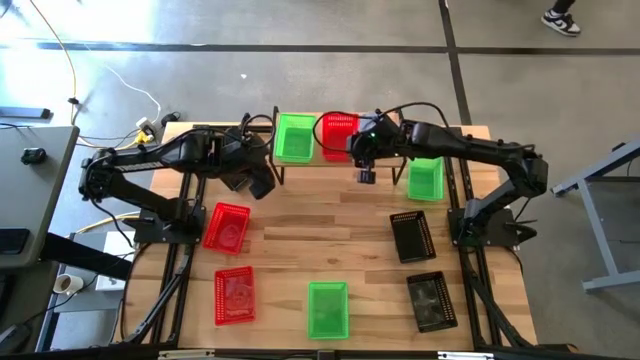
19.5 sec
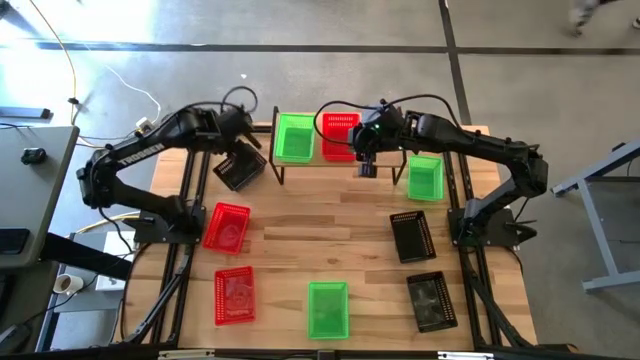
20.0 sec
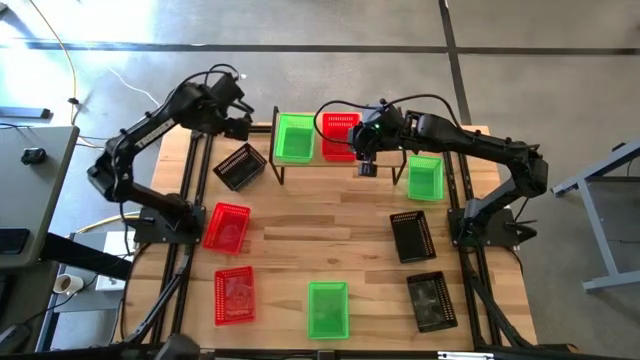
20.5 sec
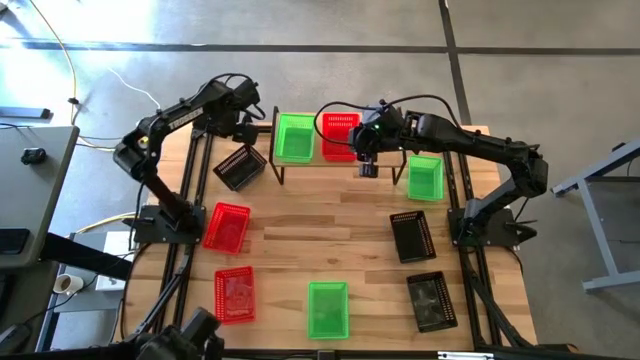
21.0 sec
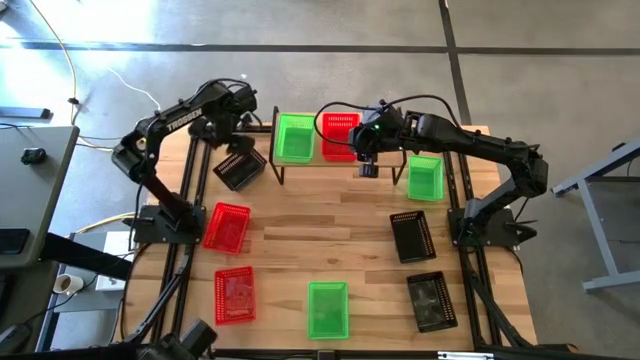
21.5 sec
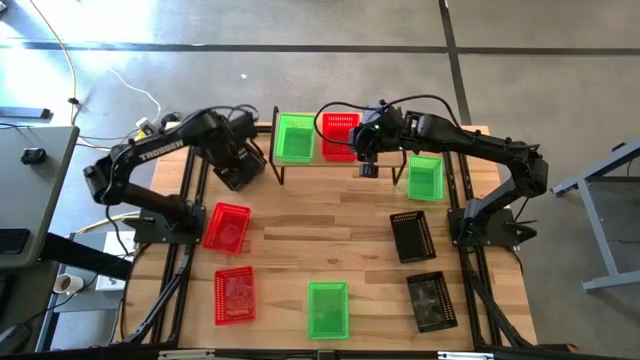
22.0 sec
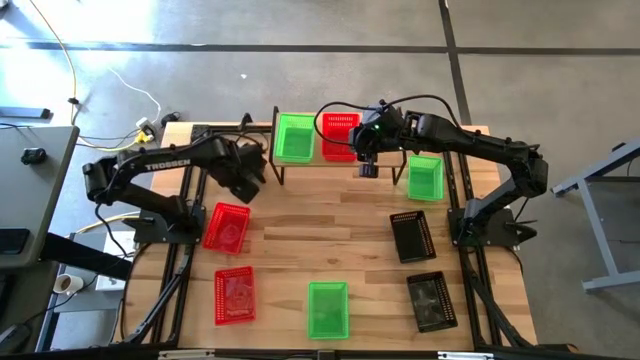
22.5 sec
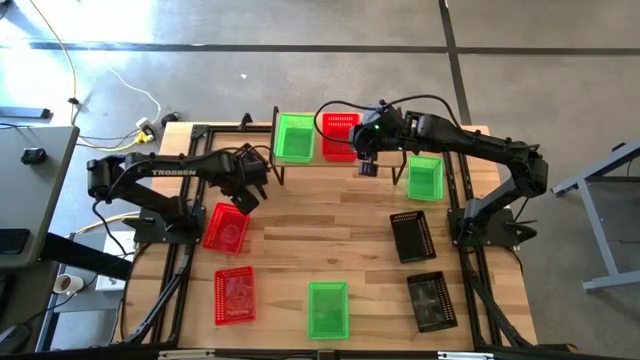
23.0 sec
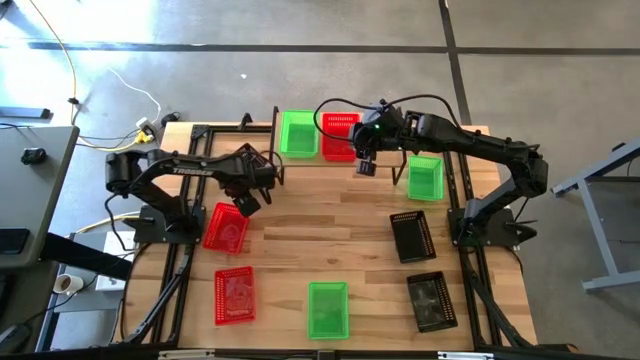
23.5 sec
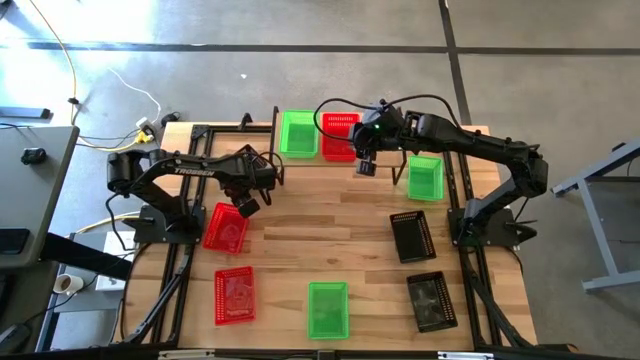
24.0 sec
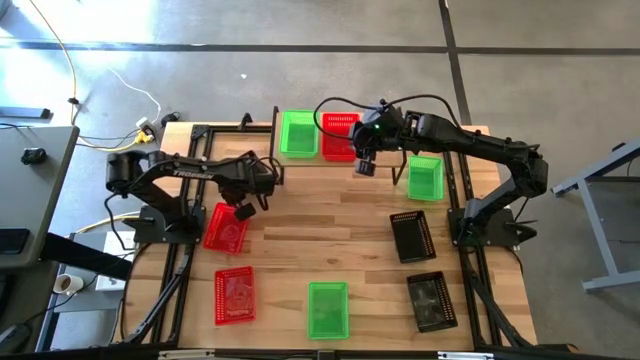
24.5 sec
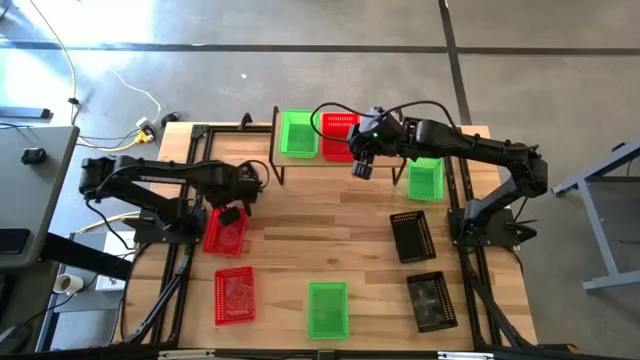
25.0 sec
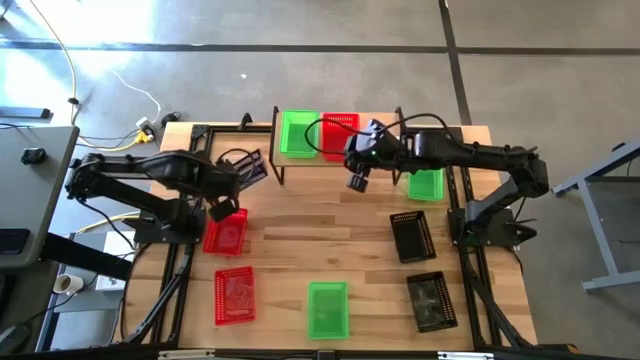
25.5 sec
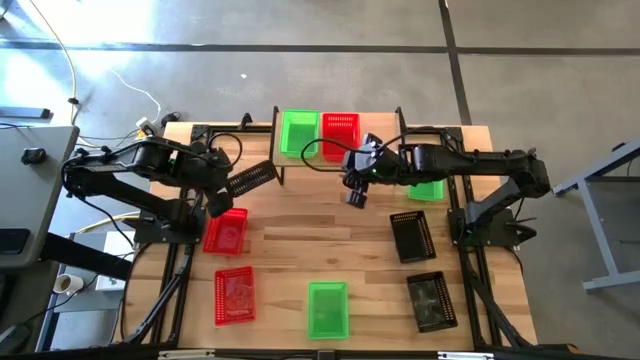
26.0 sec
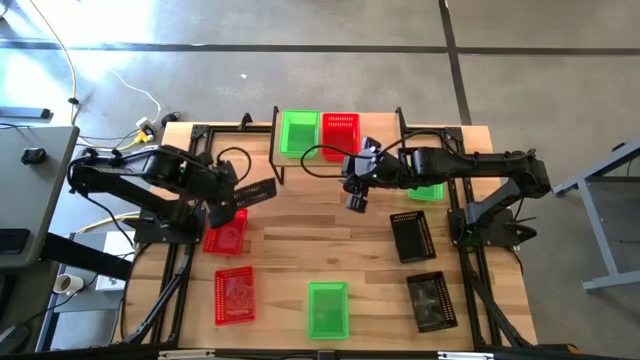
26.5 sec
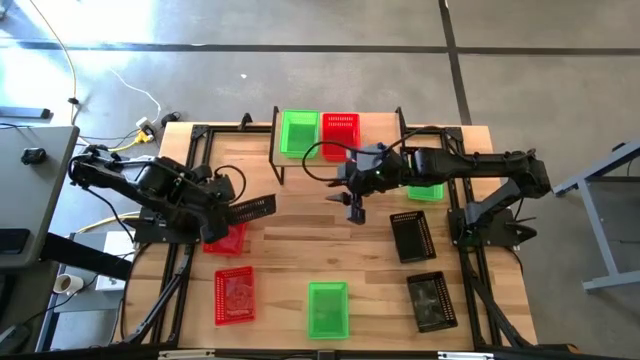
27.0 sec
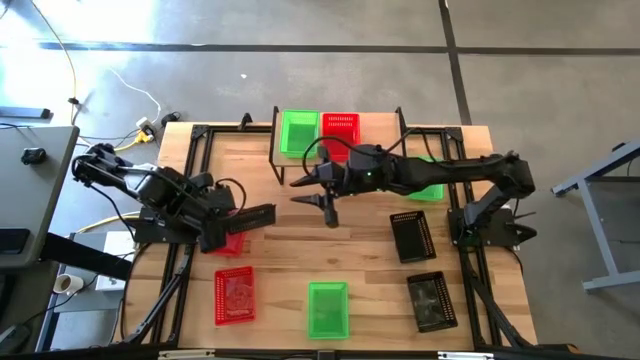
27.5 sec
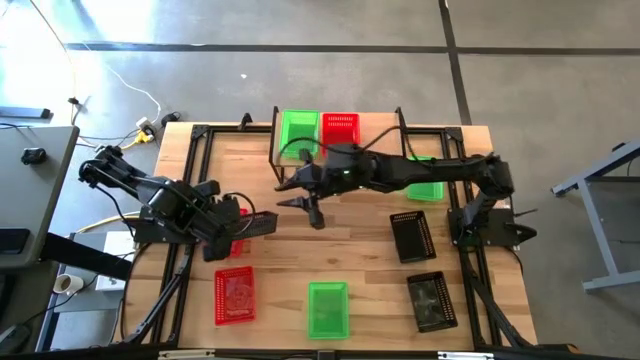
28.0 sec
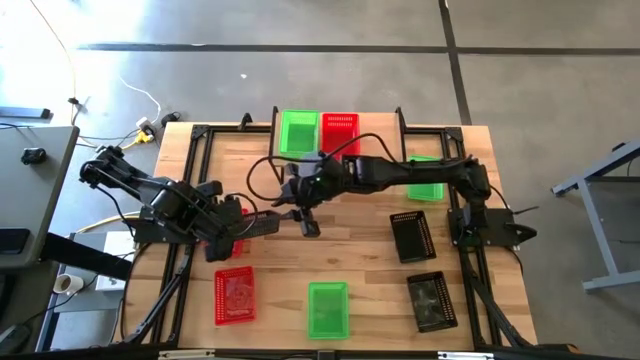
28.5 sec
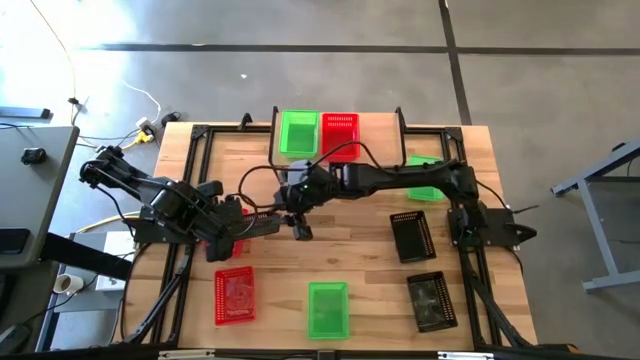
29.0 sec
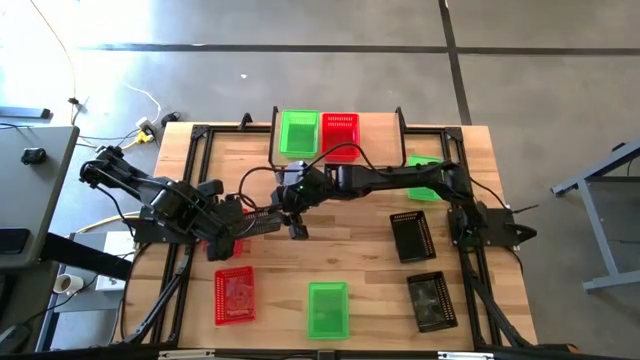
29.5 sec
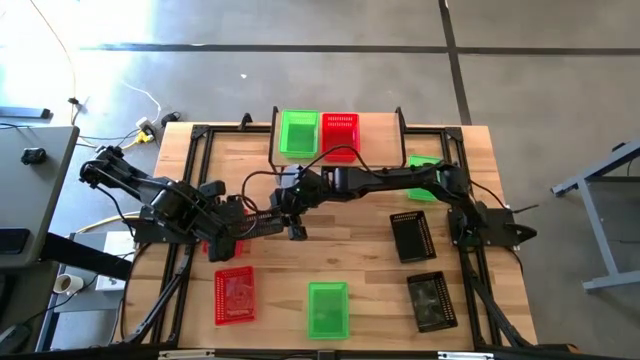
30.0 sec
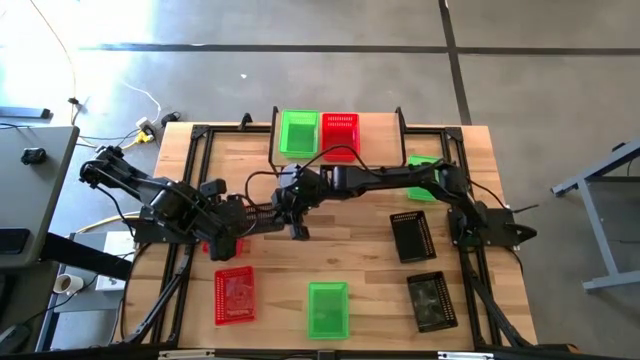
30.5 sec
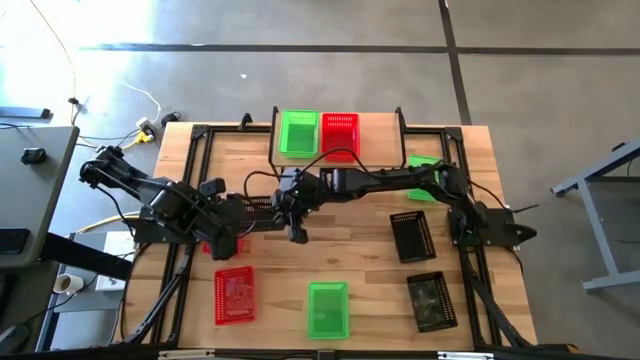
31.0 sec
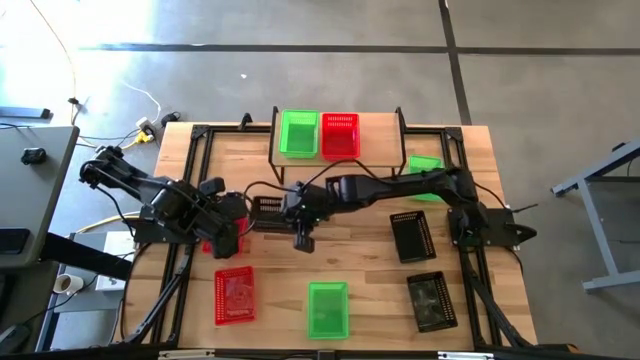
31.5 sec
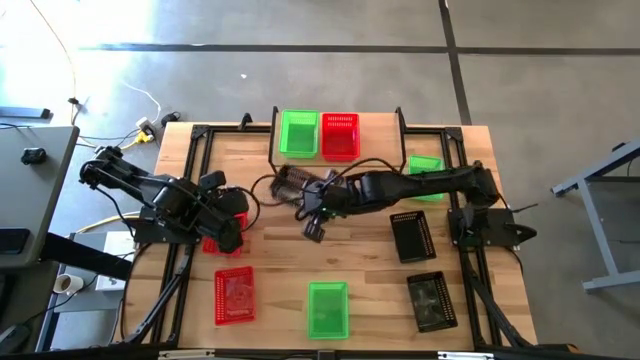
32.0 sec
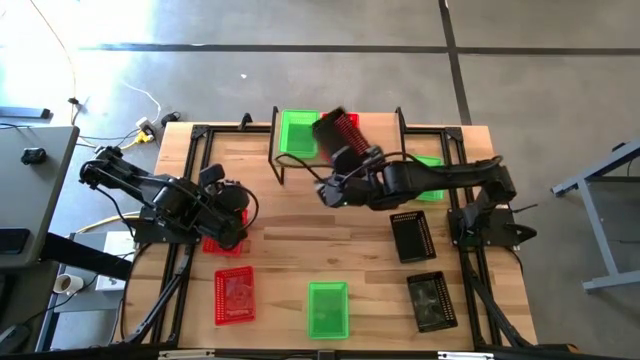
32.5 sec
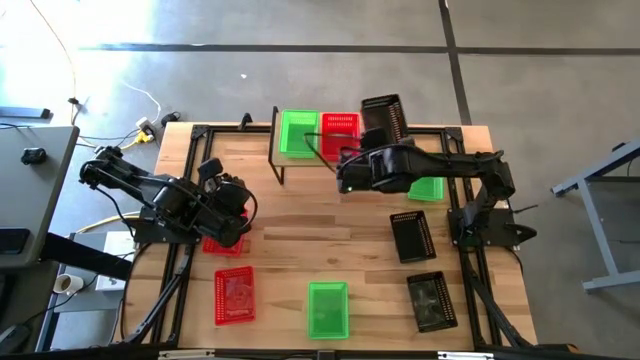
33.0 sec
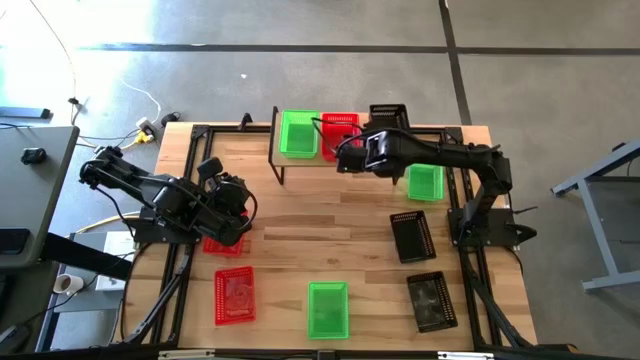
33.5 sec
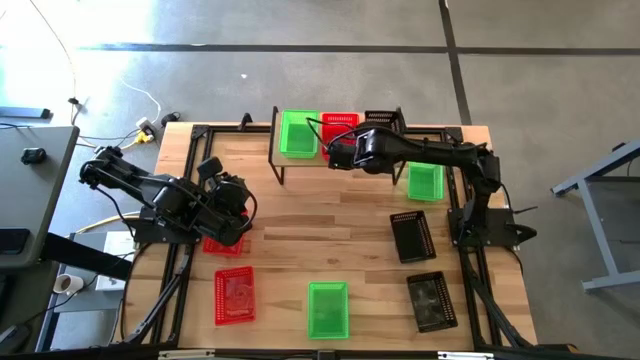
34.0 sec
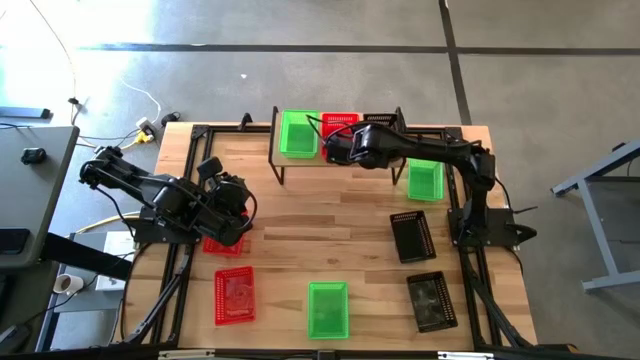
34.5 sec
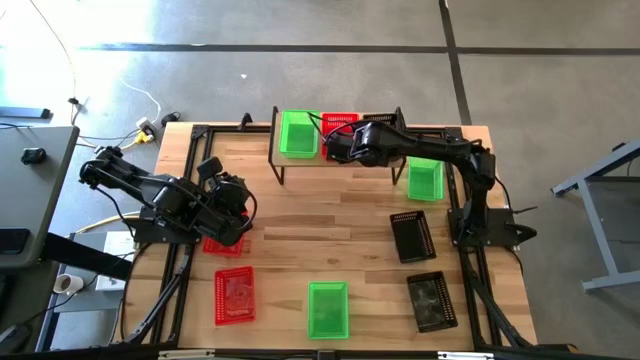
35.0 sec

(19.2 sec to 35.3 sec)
Task: Stack baskets on shelf by color
Put the top left black bin on the shelf

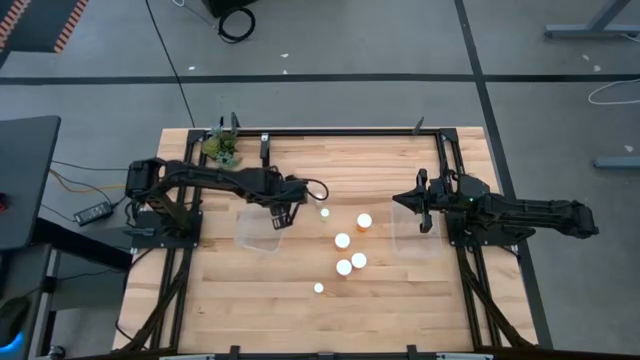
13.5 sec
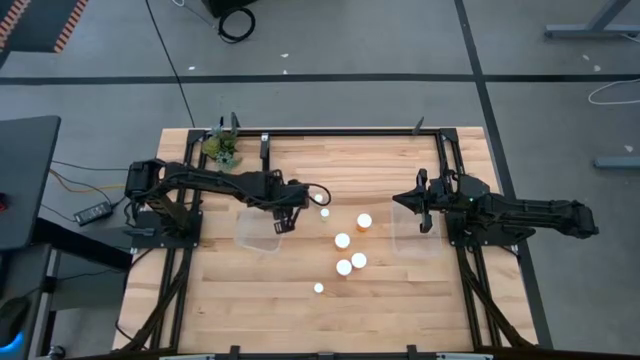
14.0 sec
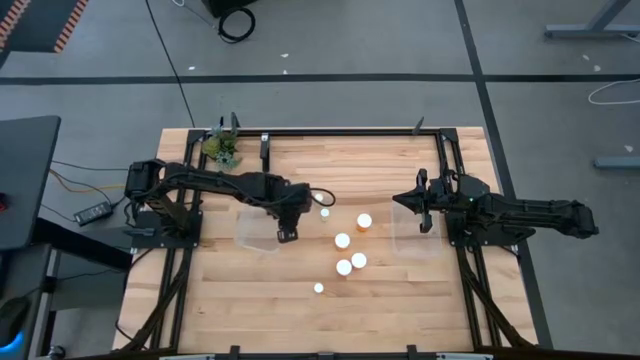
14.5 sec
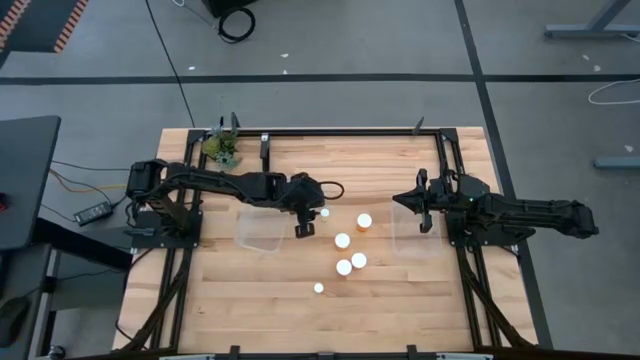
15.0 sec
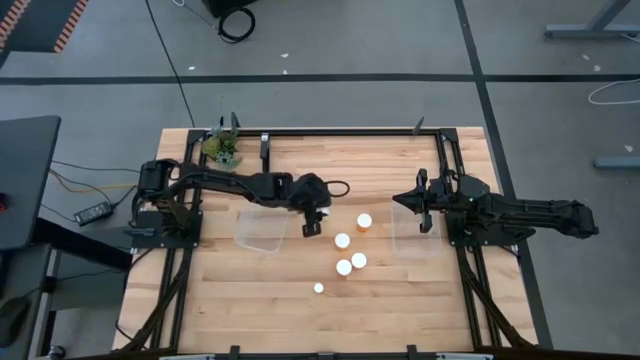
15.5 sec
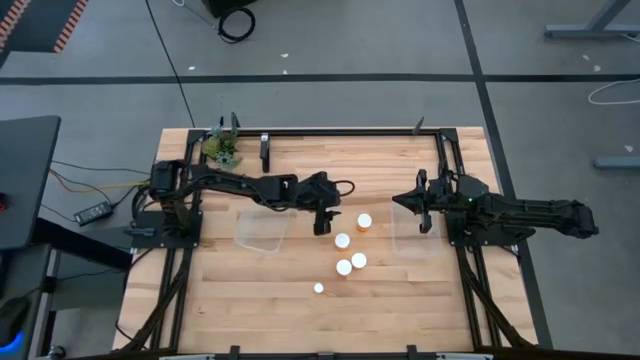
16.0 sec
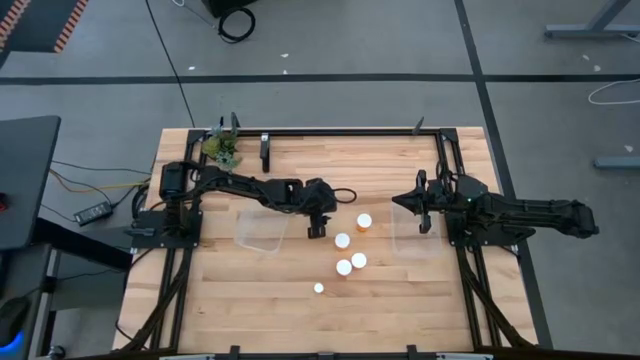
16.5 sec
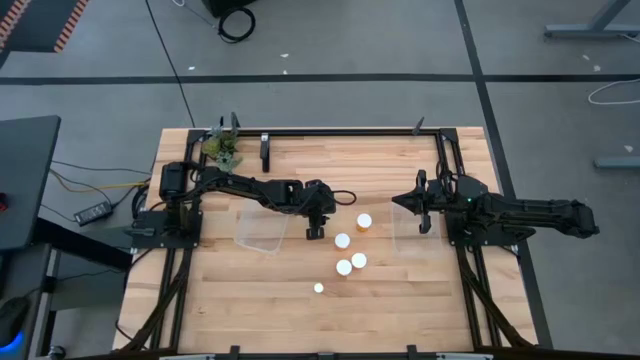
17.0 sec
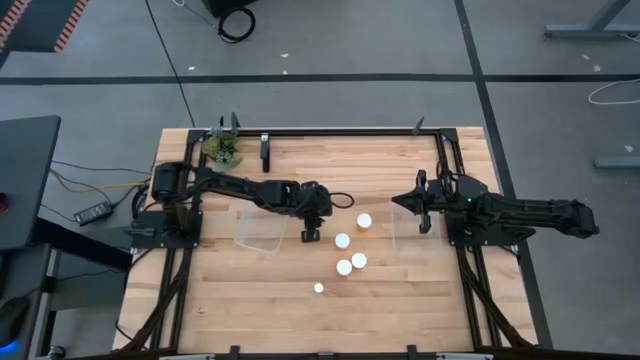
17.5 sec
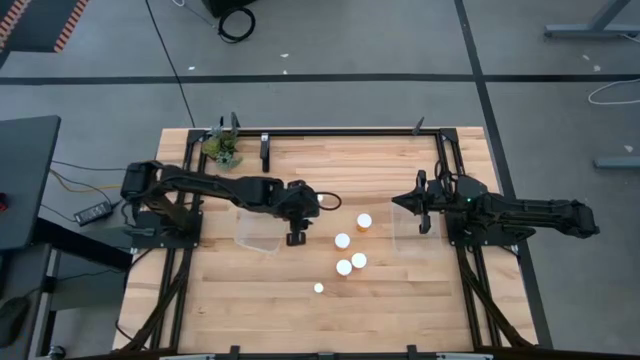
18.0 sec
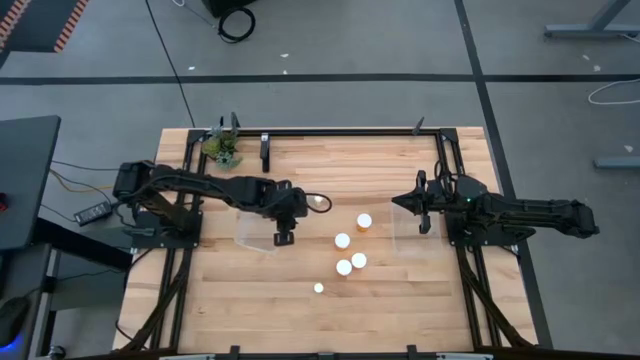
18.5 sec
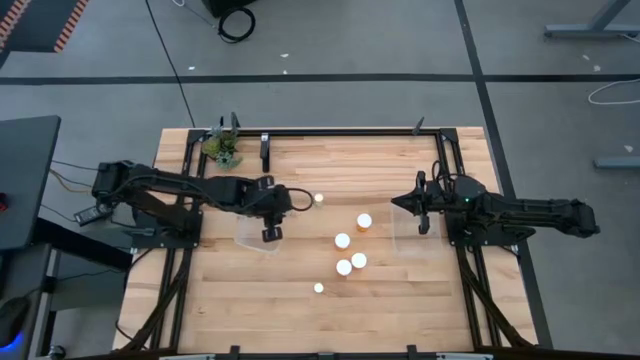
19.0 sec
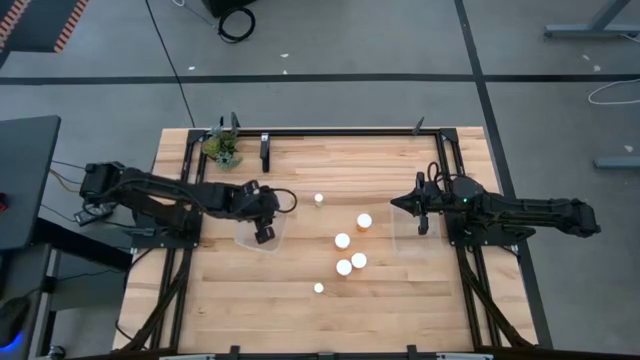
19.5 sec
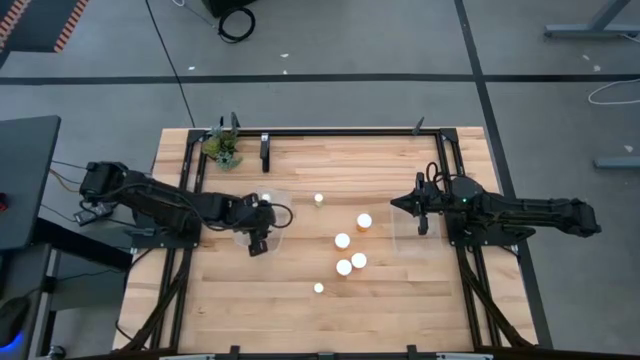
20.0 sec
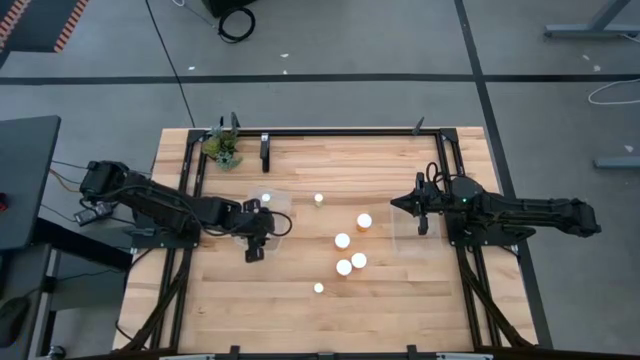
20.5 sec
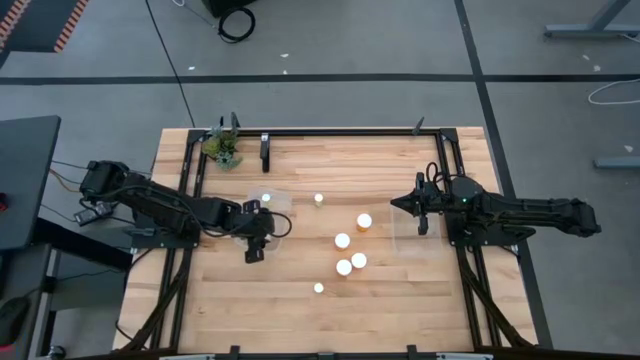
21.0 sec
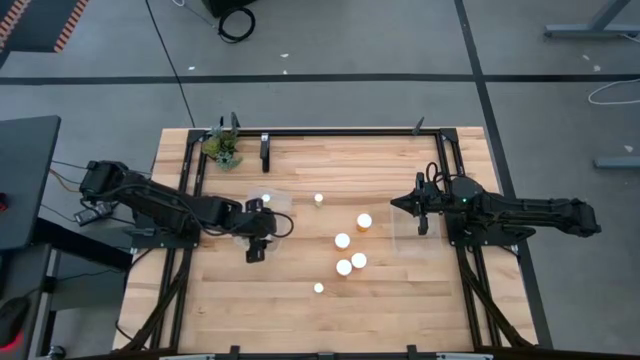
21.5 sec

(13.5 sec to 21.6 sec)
Task: Pick and place medicine bottles into bin by pill shape (circle, oval)
Put the yellow tablet bottle into the left transparent bin
